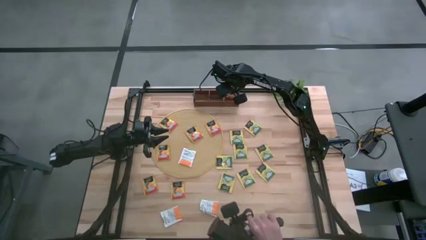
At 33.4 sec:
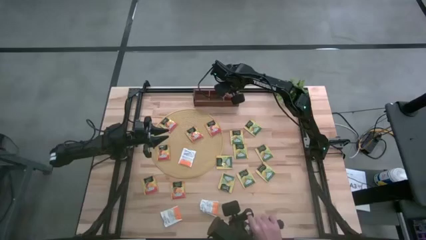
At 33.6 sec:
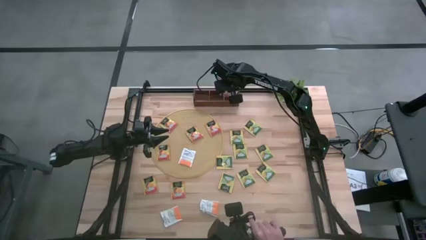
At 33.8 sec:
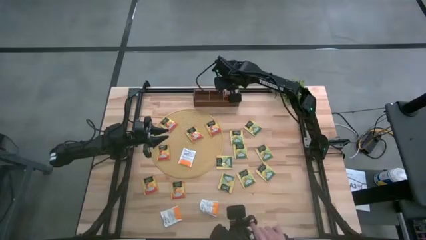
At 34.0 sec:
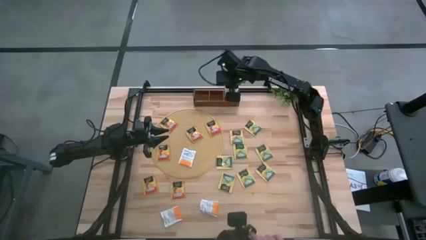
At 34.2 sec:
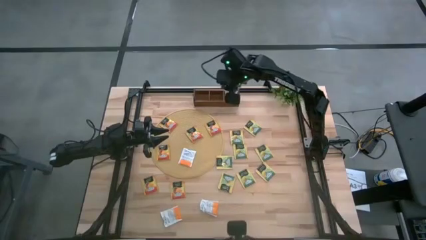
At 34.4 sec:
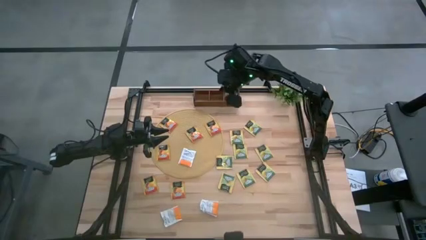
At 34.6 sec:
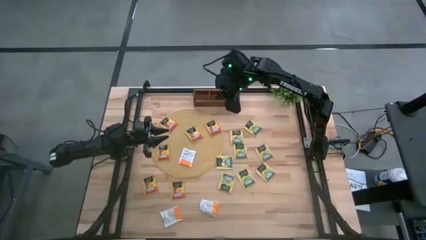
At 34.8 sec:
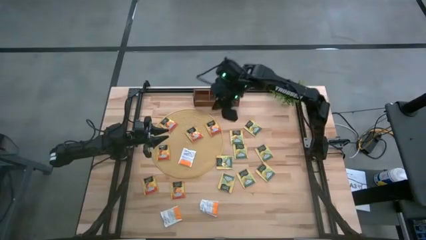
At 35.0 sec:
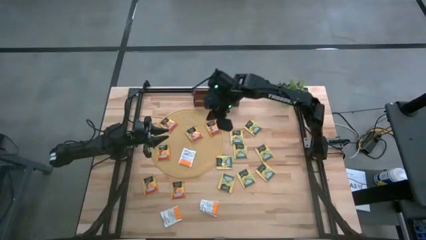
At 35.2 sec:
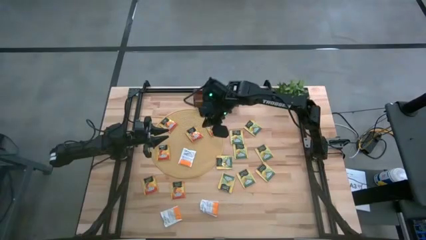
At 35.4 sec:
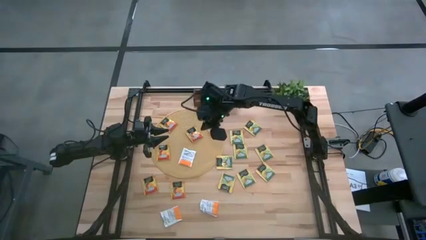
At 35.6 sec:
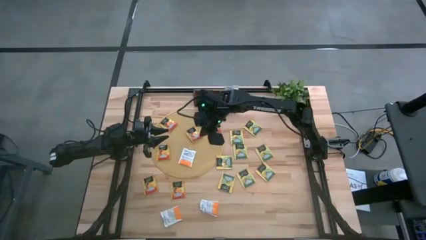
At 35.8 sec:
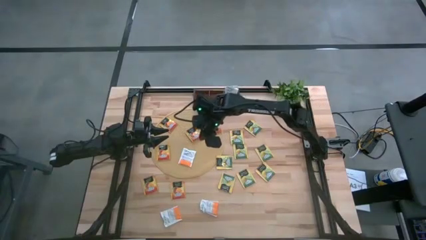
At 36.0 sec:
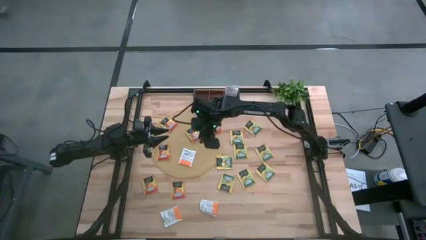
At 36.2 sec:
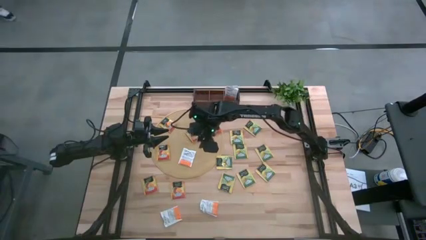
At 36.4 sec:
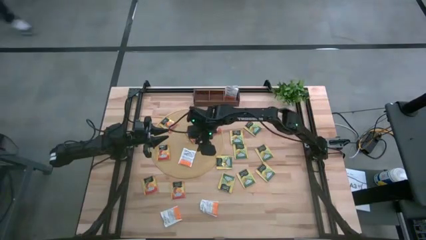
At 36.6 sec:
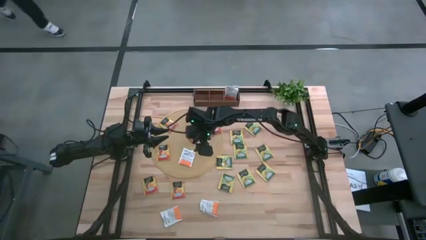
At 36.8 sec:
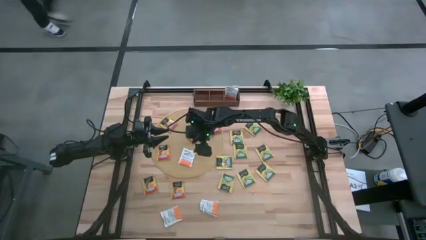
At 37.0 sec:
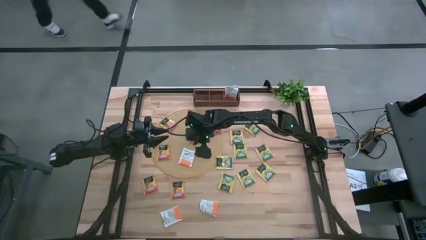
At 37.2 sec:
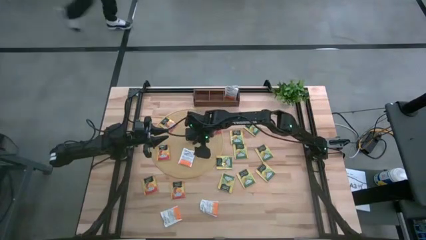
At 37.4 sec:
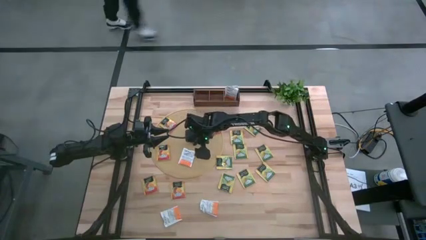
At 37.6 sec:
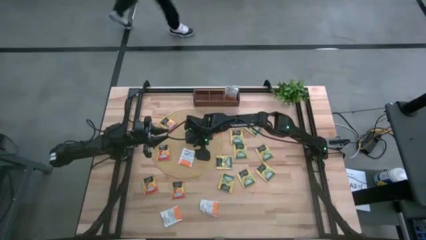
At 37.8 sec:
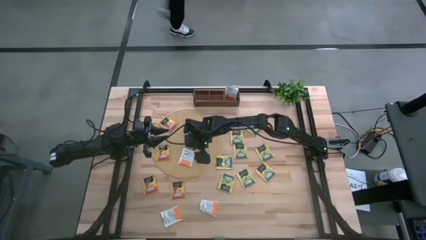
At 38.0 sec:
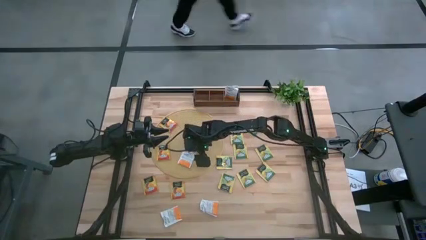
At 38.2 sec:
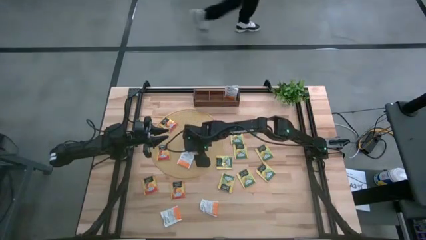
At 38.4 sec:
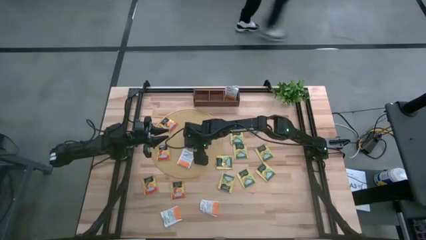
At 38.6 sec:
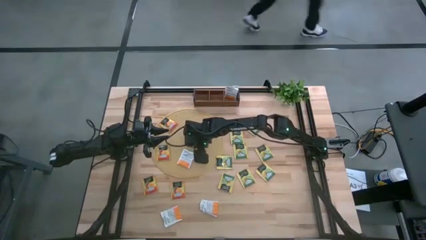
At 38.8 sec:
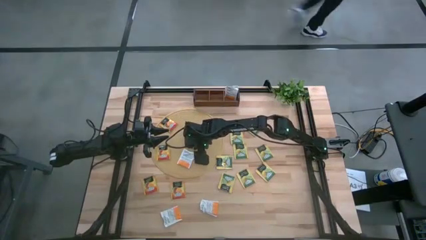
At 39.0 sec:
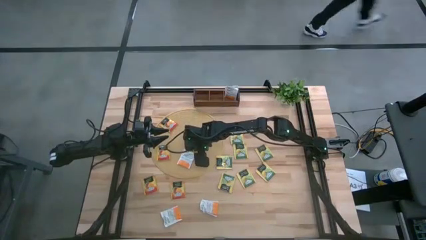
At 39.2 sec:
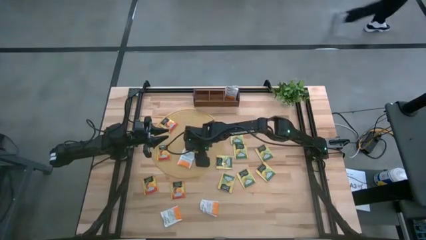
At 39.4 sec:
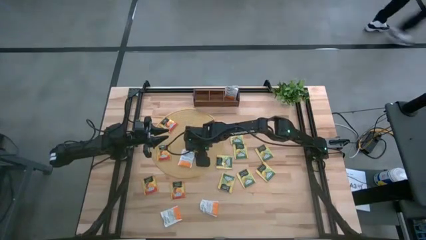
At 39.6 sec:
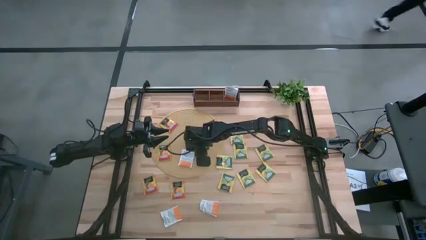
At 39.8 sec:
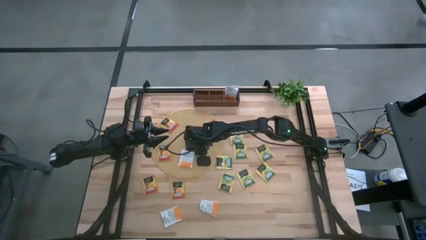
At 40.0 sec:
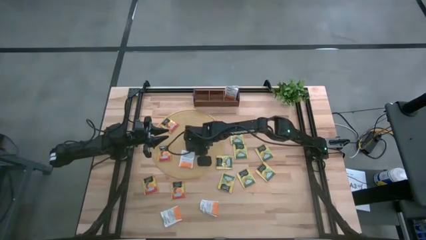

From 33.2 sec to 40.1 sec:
Task: Pick & Place Tea
Put the top white tea bag into the right section of the wooden organizer

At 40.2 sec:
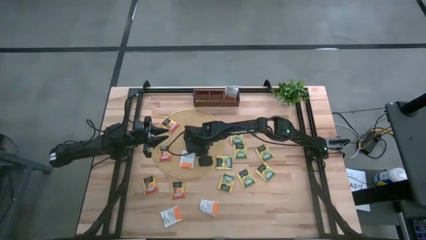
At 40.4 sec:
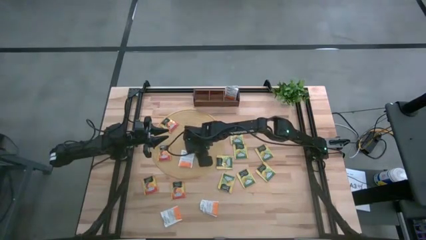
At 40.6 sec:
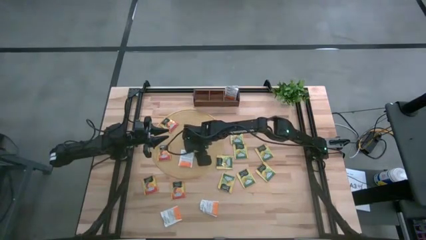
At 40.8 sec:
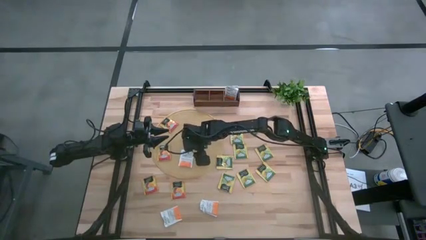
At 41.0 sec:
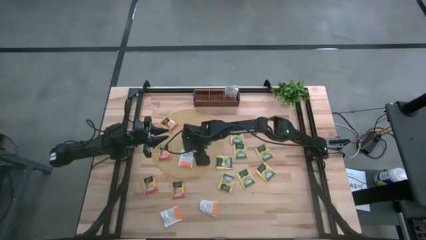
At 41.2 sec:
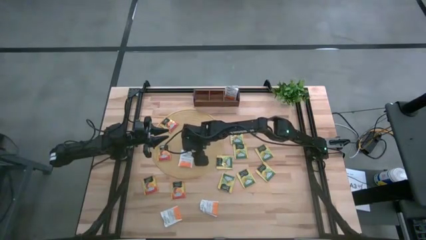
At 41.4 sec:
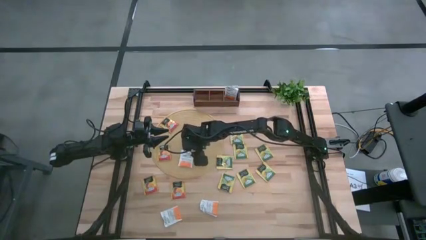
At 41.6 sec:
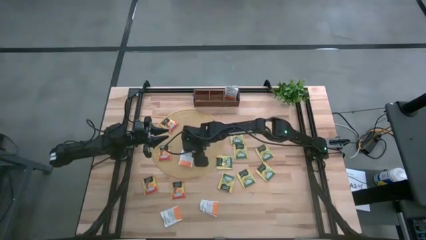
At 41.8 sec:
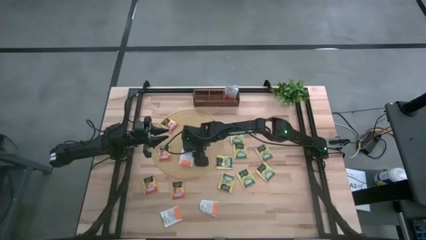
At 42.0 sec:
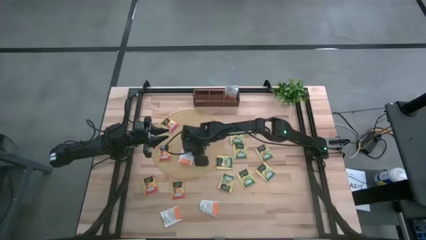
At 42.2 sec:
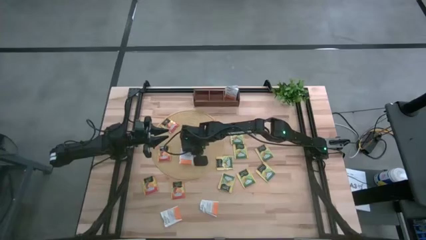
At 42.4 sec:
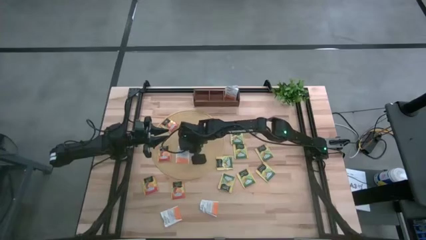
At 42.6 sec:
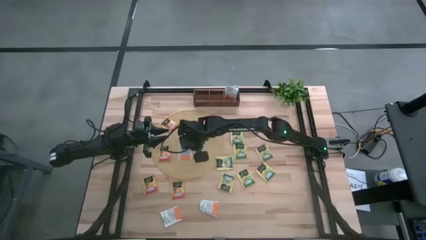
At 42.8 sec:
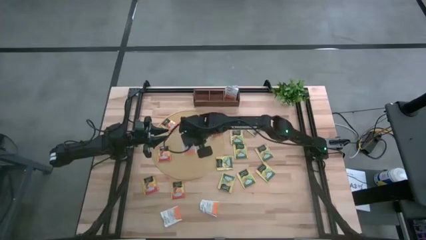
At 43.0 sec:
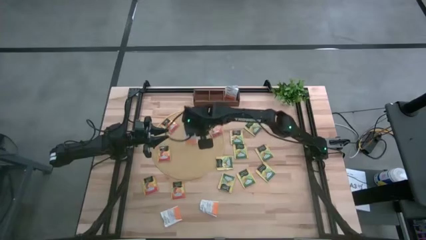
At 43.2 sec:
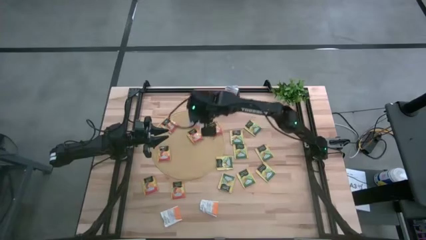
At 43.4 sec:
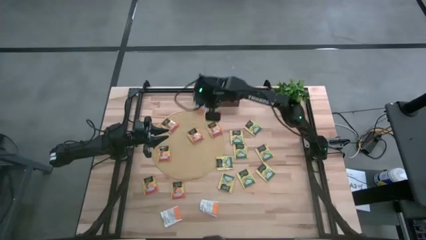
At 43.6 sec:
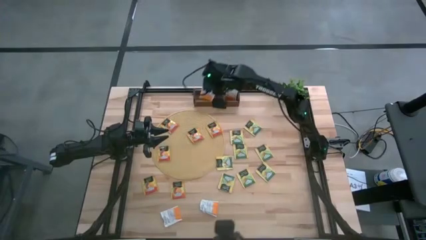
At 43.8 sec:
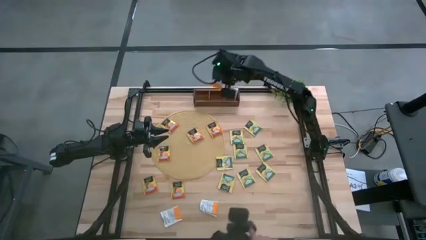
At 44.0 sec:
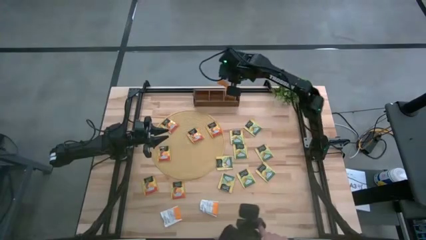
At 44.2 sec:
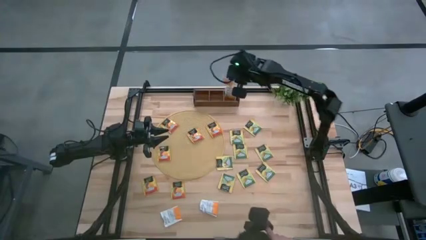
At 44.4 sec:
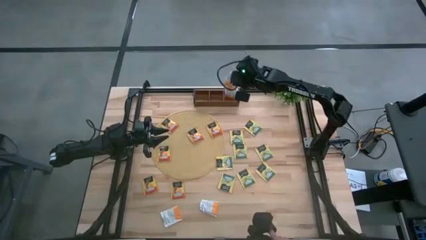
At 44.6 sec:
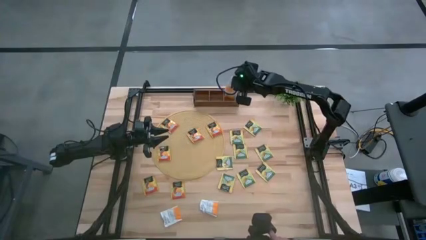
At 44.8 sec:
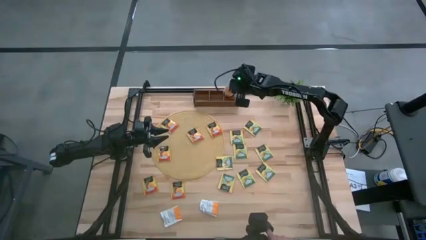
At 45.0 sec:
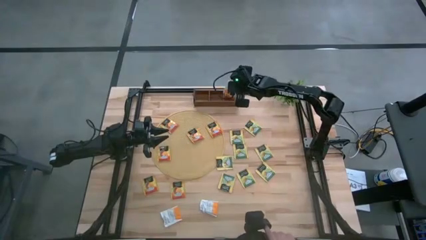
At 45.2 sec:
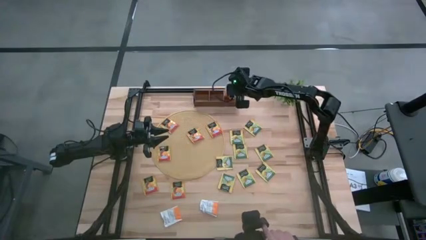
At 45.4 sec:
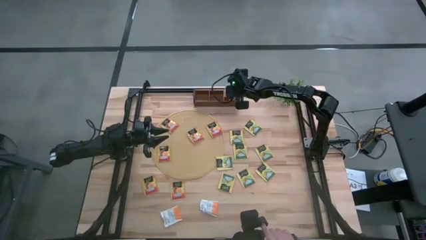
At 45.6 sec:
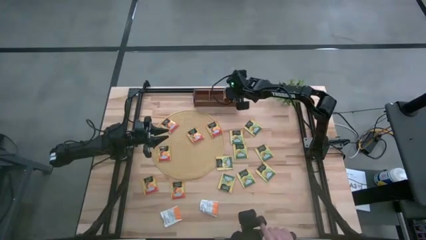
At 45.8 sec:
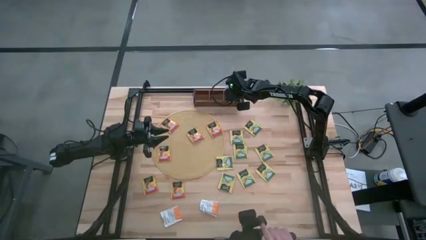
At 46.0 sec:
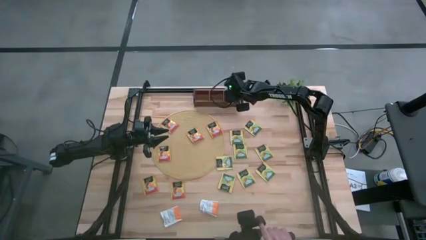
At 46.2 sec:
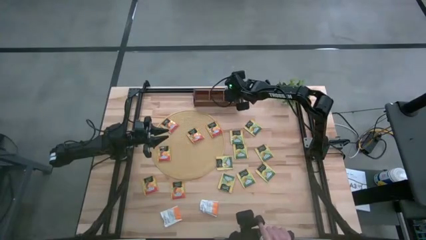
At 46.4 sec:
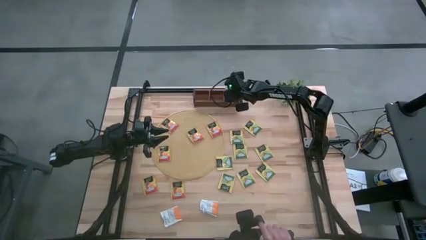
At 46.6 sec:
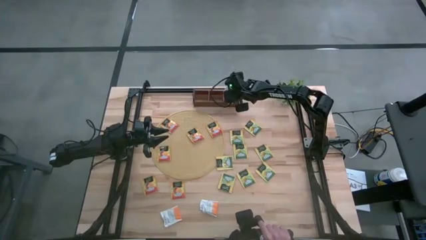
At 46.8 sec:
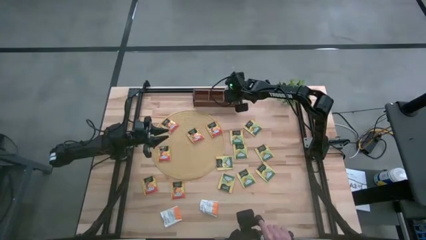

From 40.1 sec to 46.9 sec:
Put the top white tea bag into the right section of the wooden organizer
